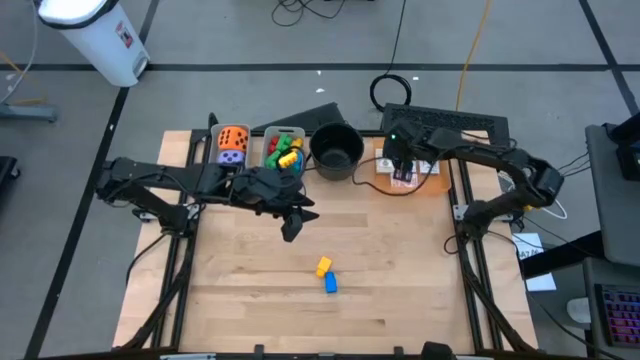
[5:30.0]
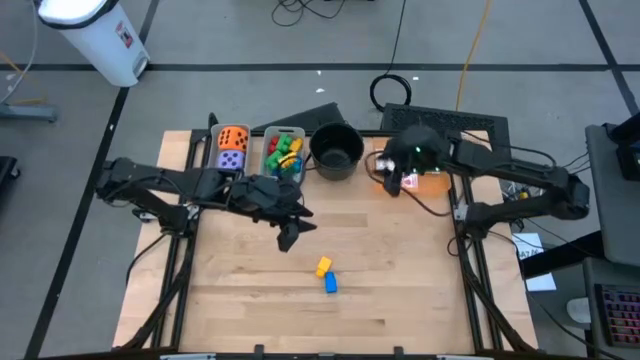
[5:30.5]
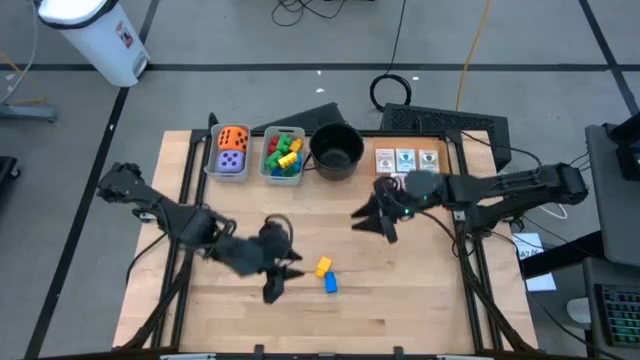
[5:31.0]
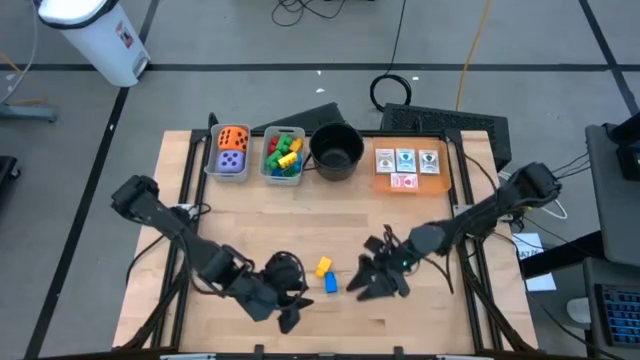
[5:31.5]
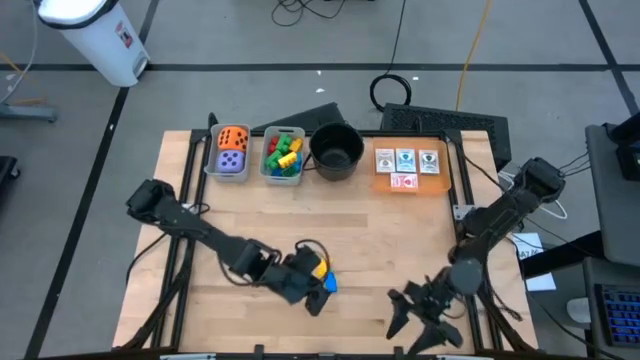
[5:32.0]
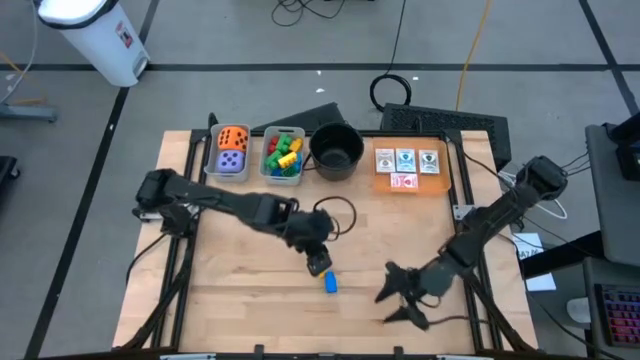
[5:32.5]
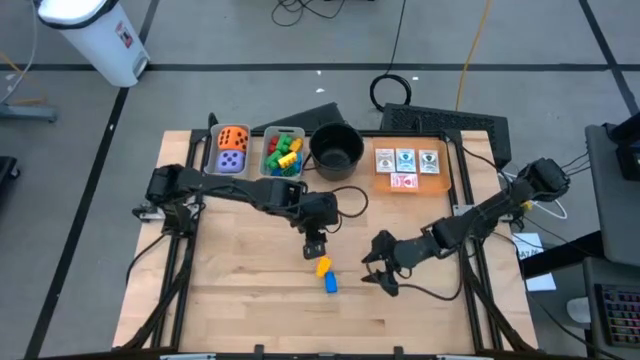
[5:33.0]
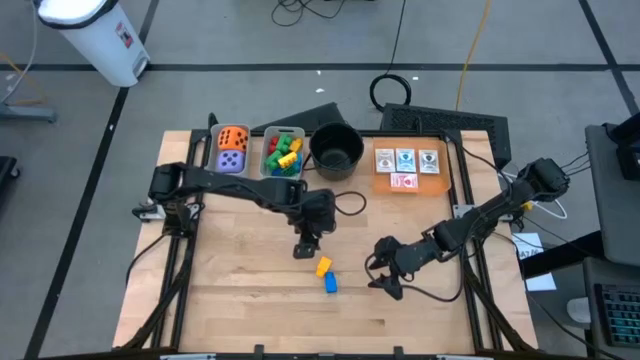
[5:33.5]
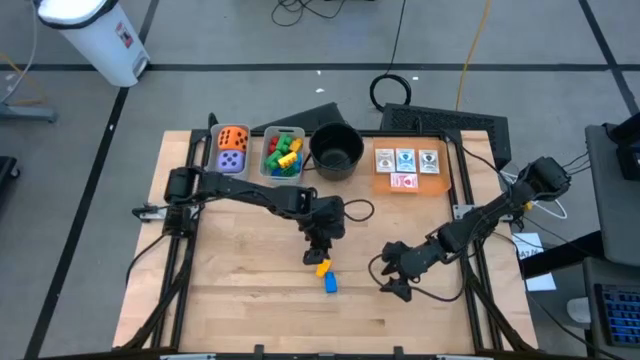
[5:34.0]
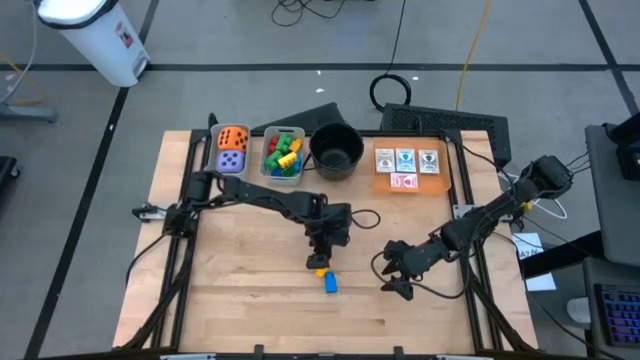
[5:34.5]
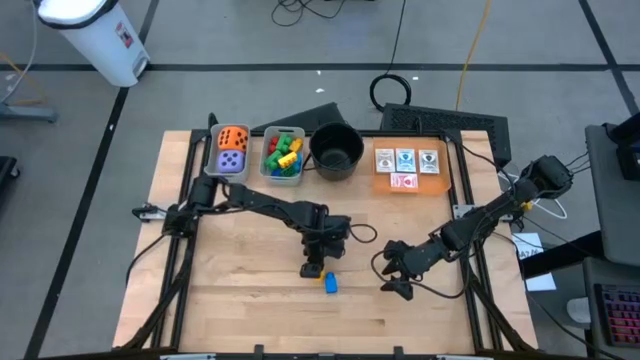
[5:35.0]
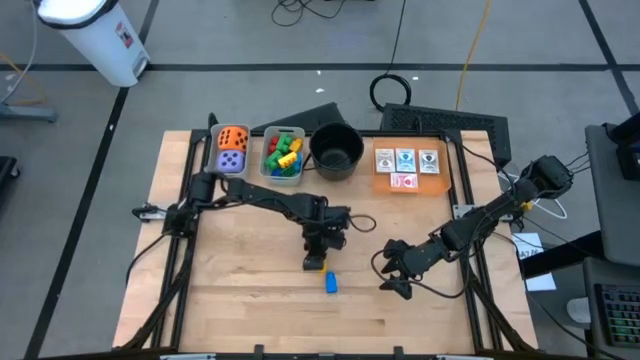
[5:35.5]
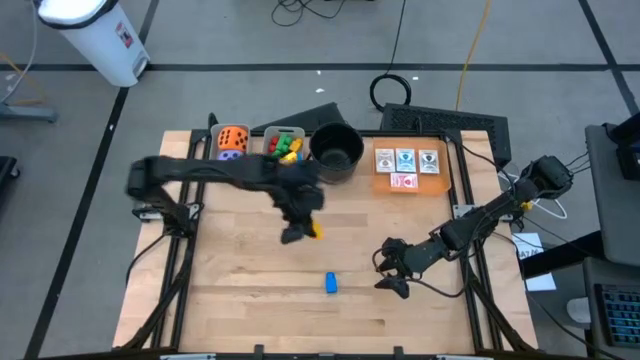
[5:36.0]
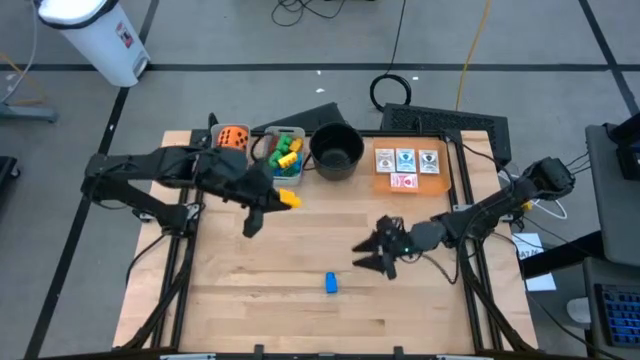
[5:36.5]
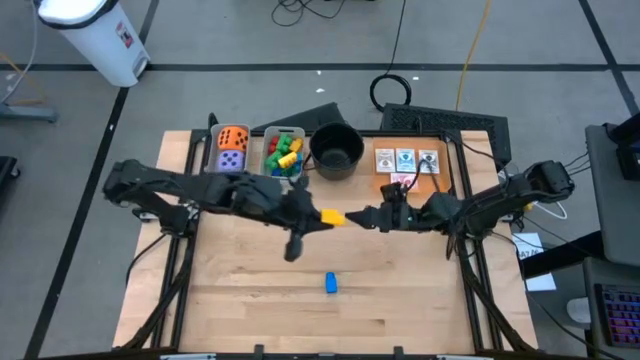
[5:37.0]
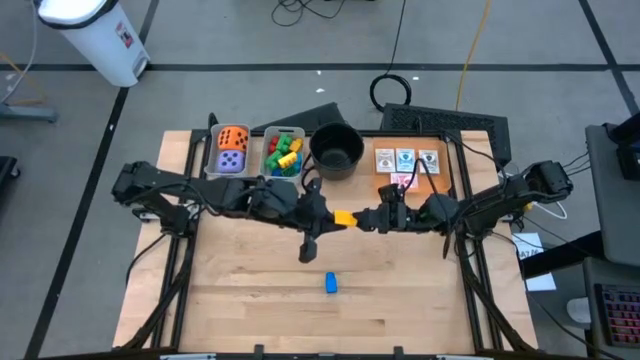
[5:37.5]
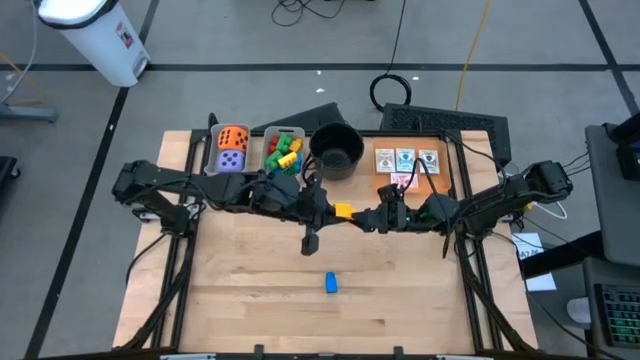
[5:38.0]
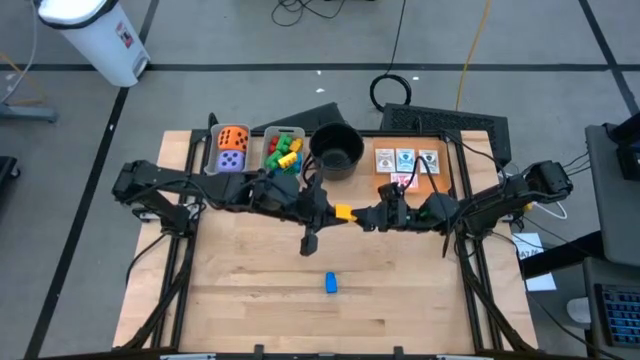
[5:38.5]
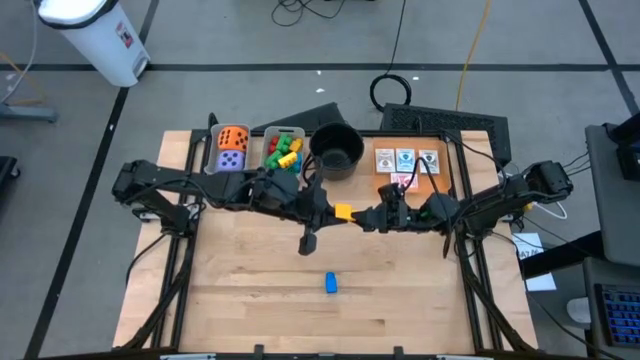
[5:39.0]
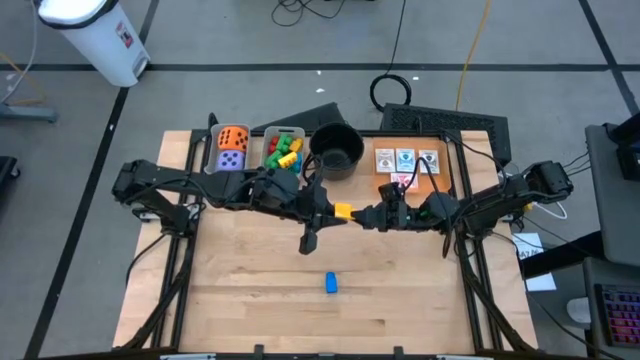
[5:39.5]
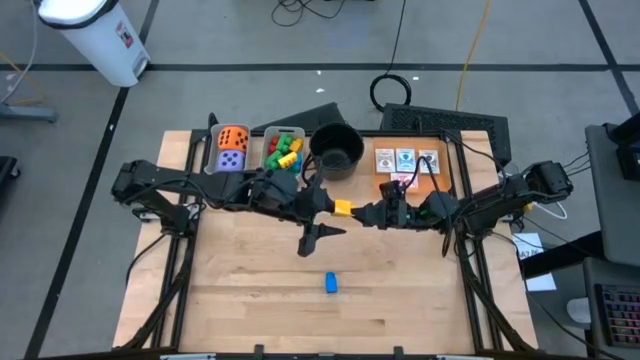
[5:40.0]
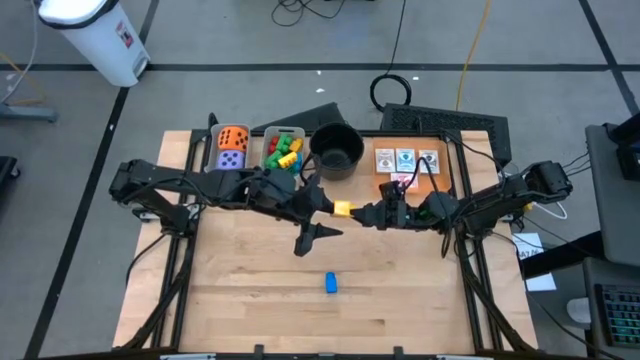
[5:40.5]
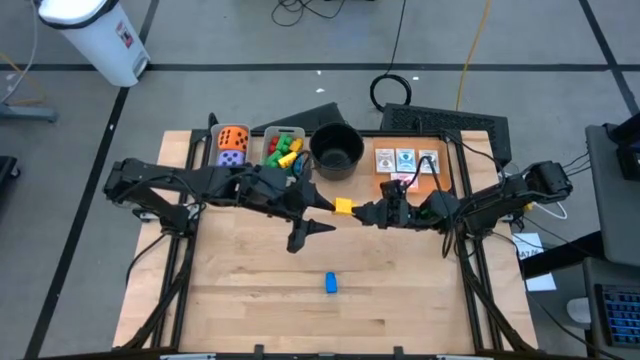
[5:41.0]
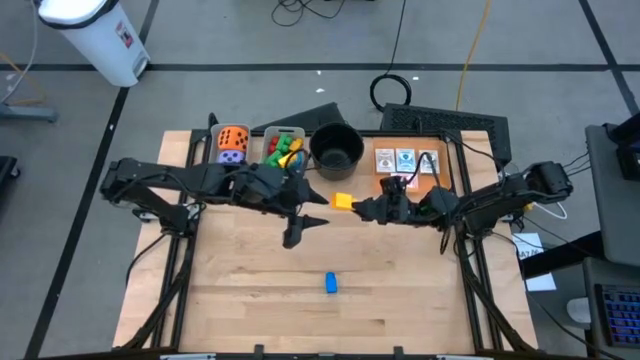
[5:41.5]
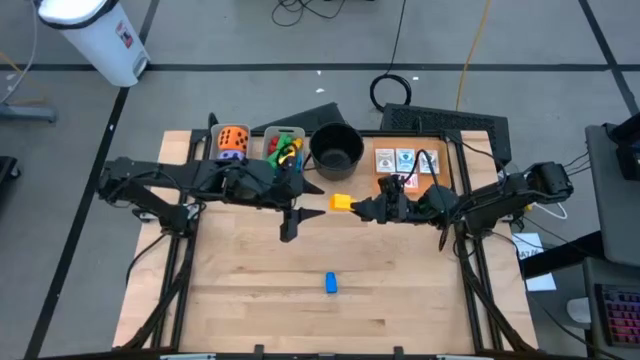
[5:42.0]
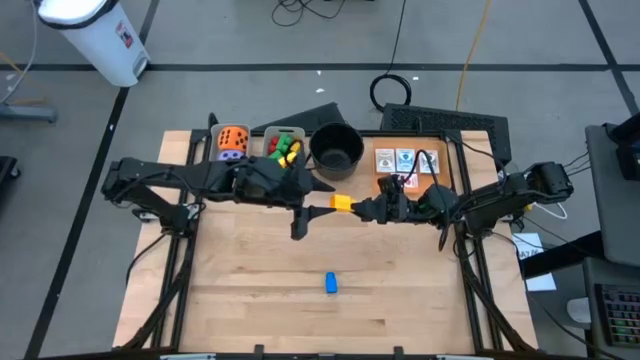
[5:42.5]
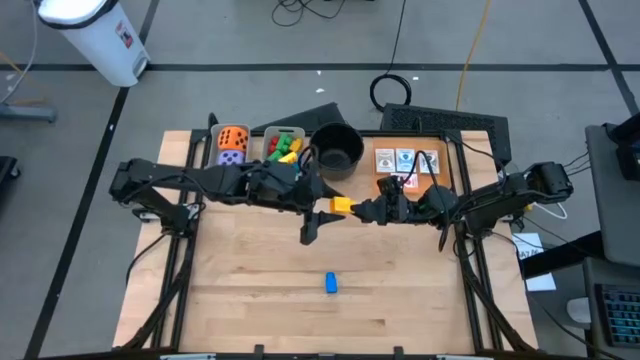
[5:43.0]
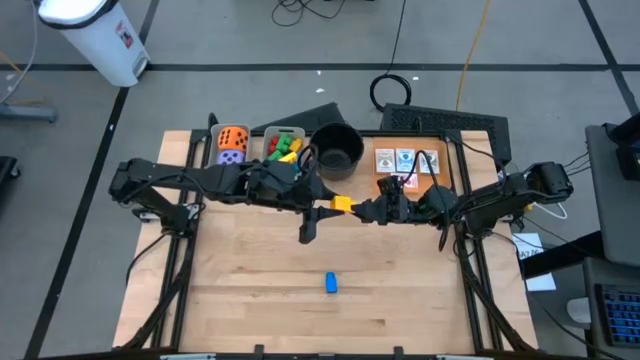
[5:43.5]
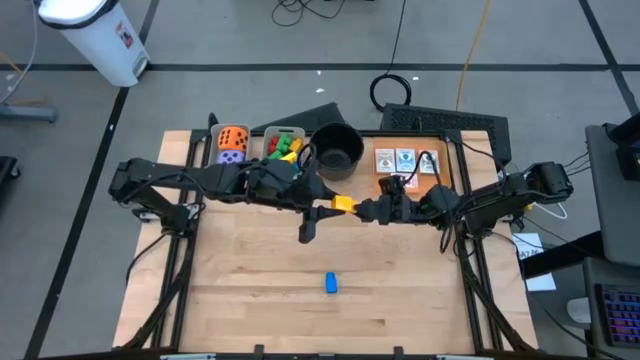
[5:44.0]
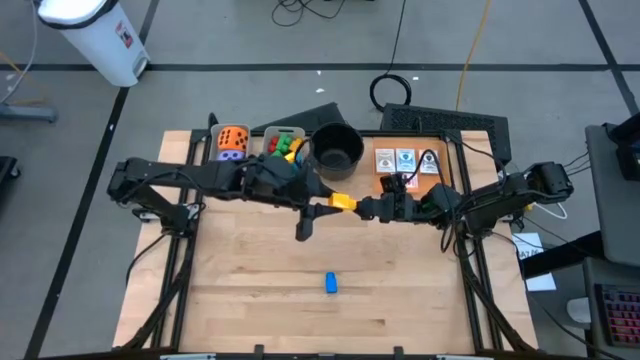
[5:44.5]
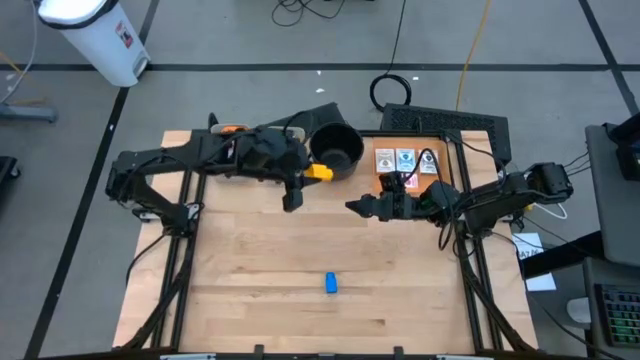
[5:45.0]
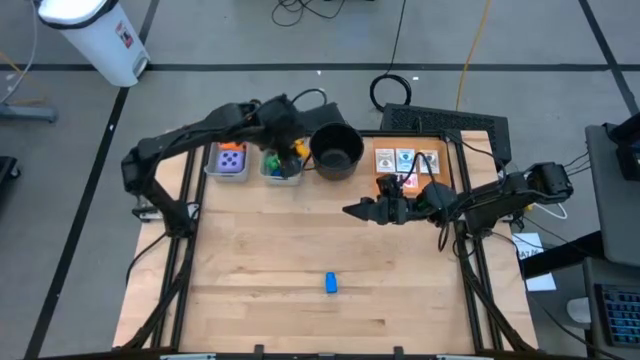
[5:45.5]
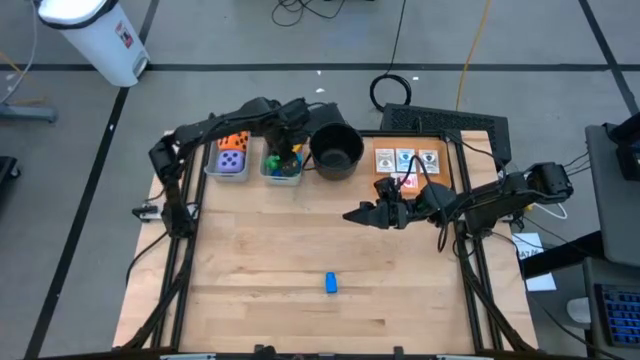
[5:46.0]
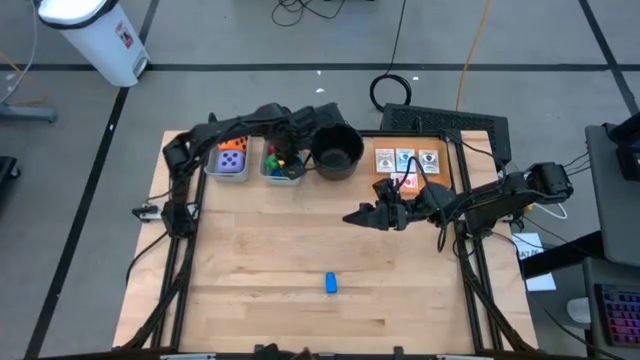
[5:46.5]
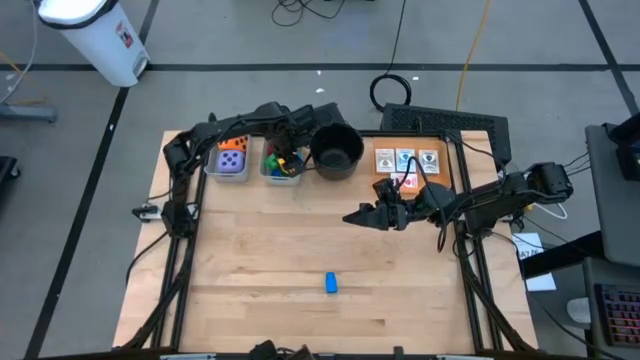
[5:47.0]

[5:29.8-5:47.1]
Task: Pick & Place Toys
Put the yellow game piece into the right gray bin

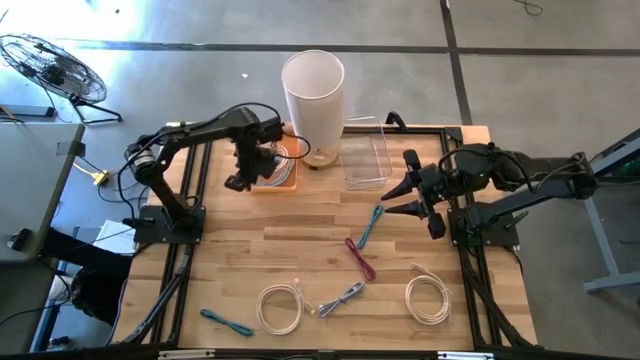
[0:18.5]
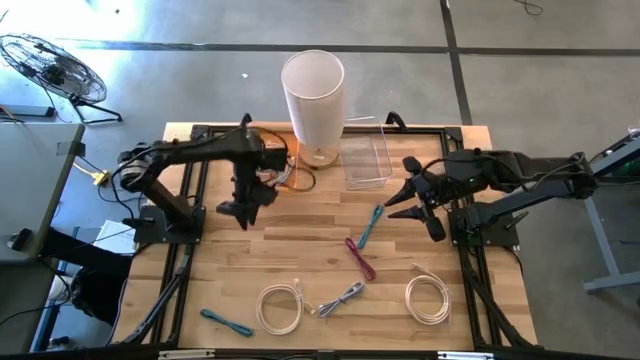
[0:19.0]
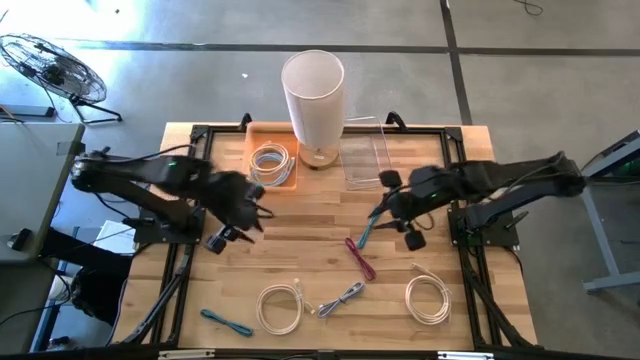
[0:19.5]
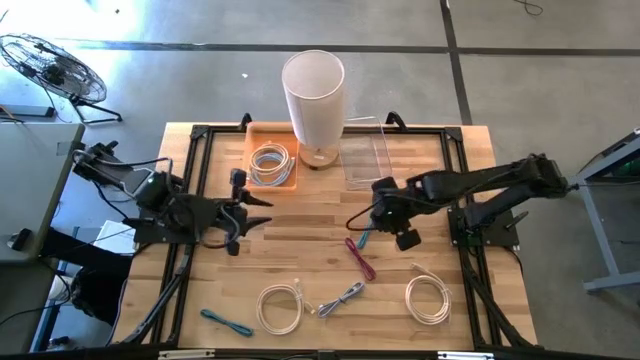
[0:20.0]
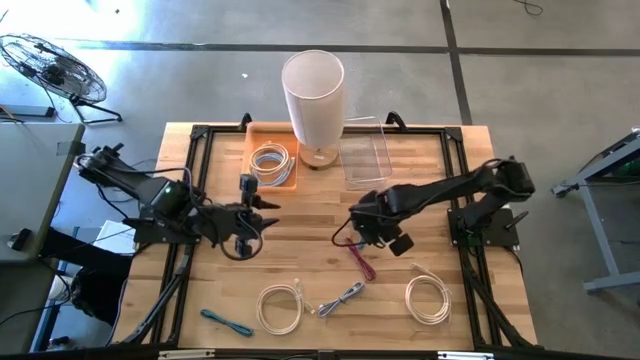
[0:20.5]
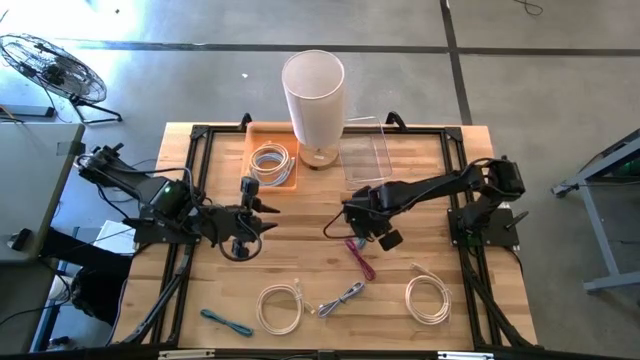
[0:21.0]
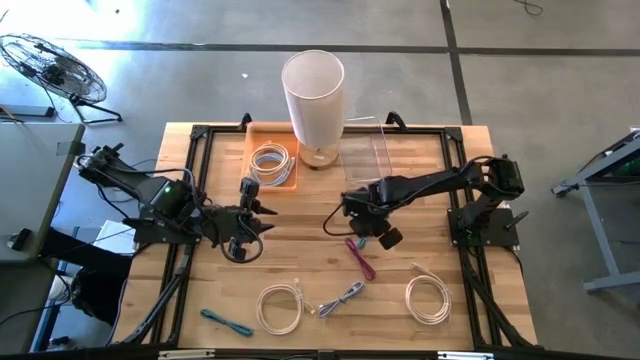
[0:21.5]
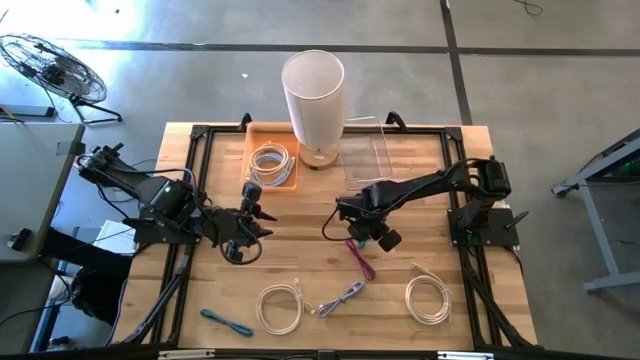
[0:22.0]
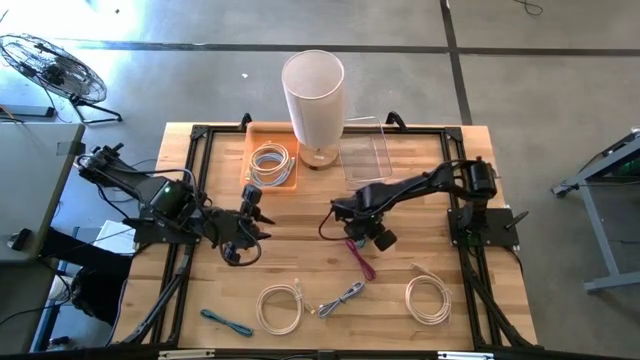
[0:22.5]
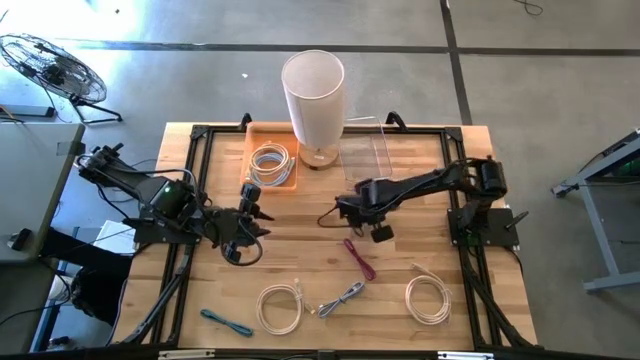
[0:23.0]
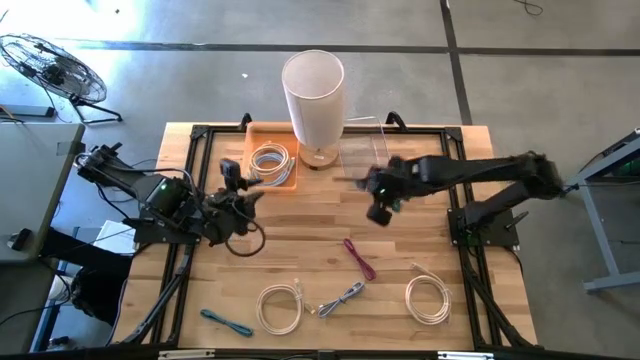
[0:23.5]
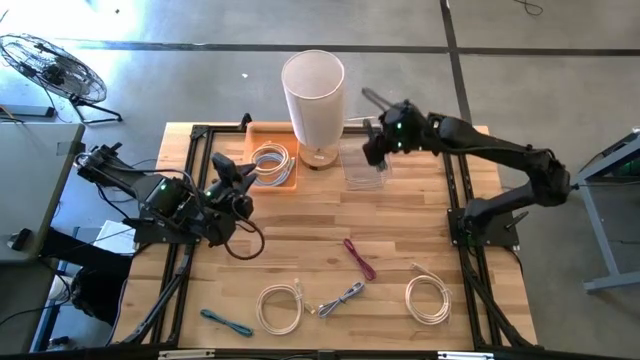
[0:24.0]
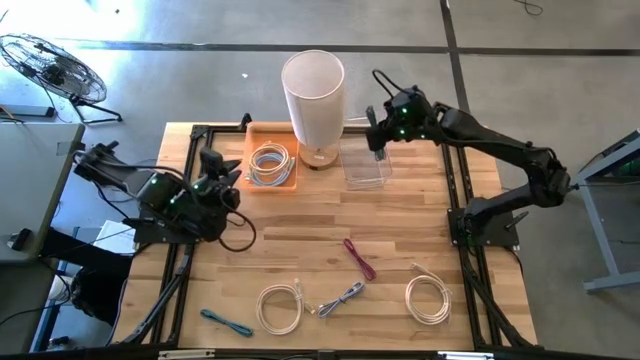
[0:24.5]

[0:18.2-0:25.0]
Task: Pick & Place USB Port
Put the top blue USB cable into the transparent bin
